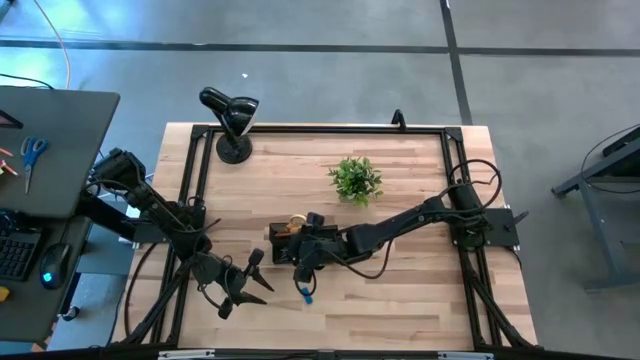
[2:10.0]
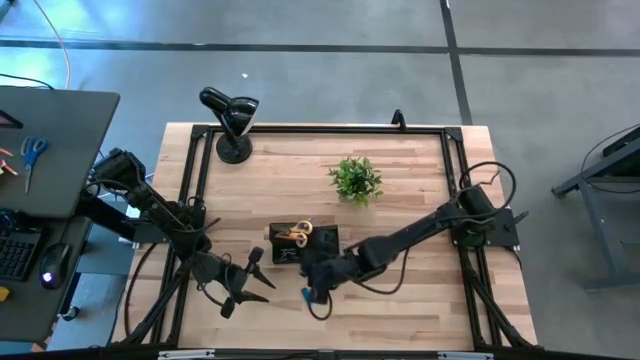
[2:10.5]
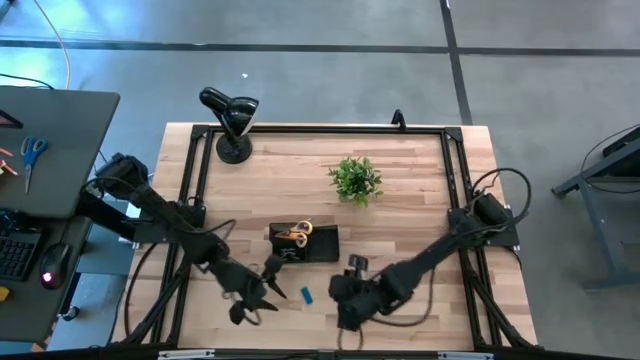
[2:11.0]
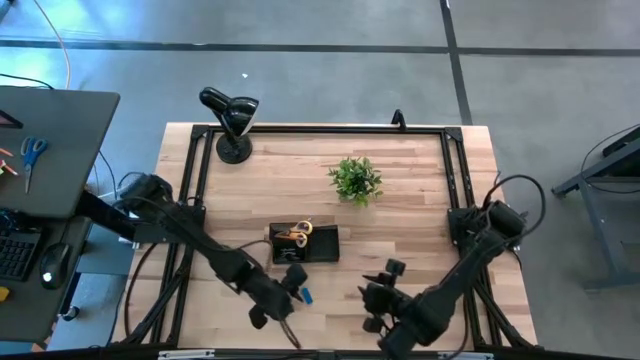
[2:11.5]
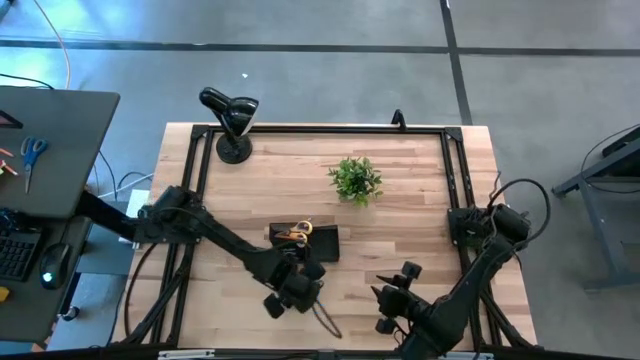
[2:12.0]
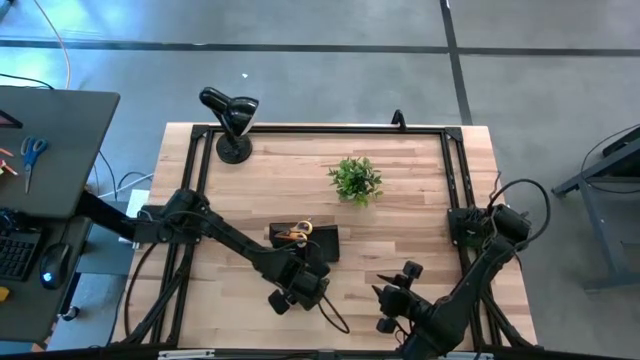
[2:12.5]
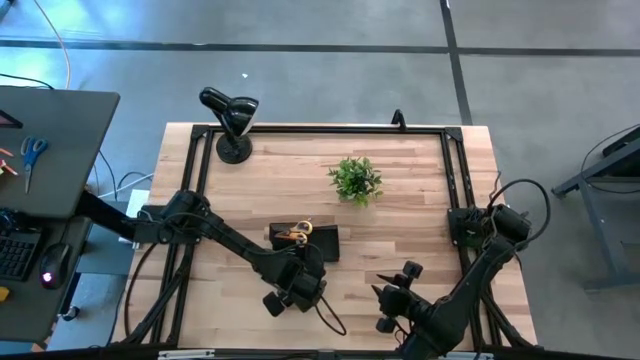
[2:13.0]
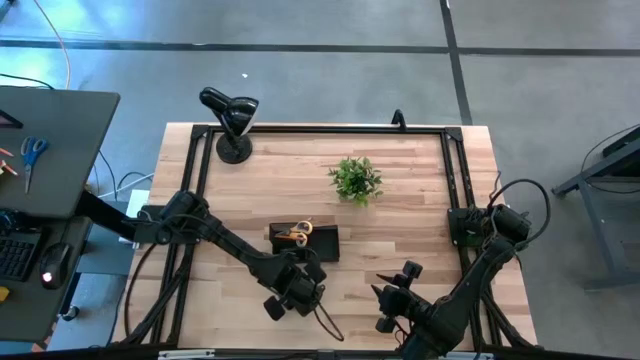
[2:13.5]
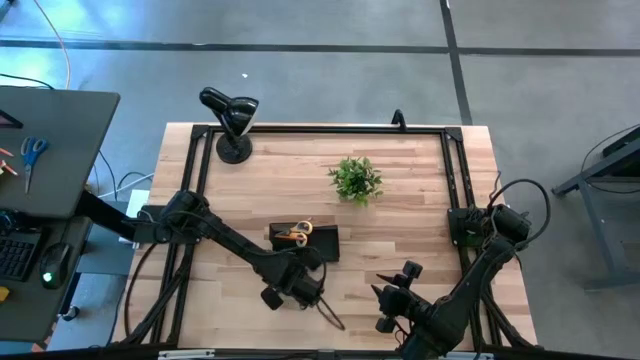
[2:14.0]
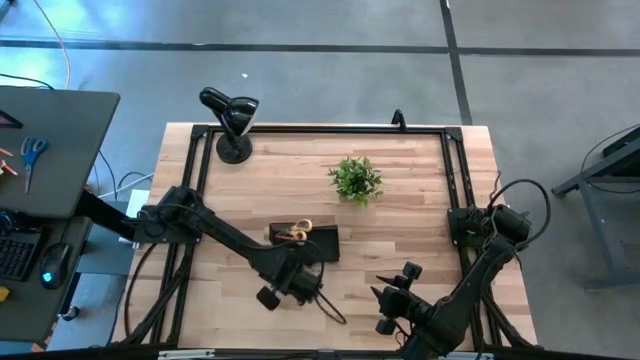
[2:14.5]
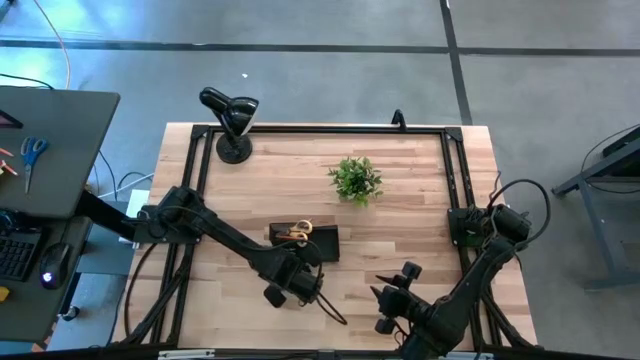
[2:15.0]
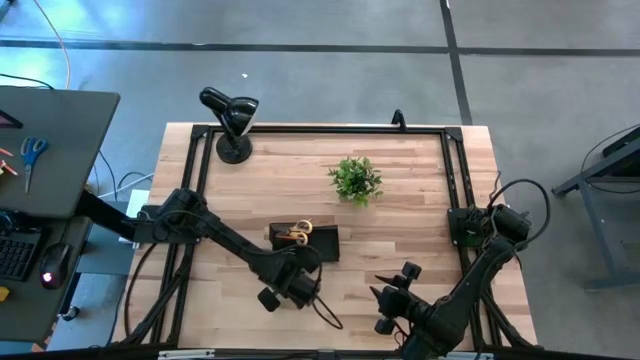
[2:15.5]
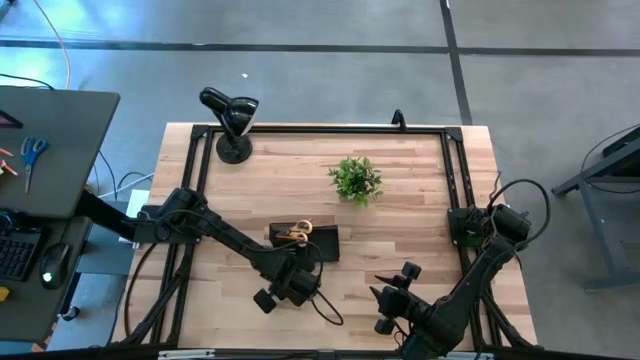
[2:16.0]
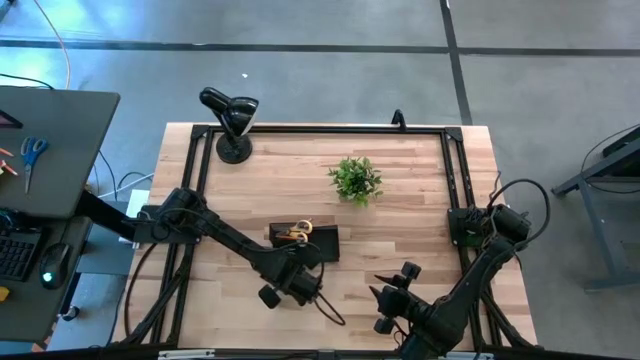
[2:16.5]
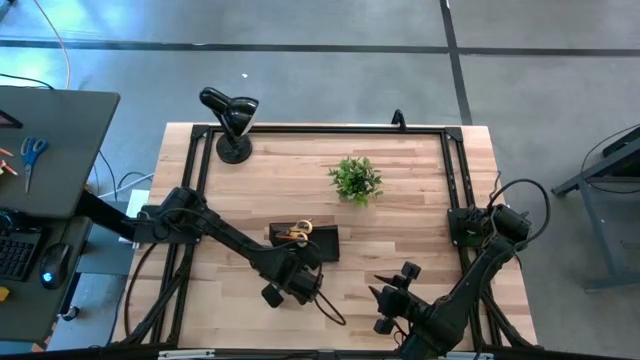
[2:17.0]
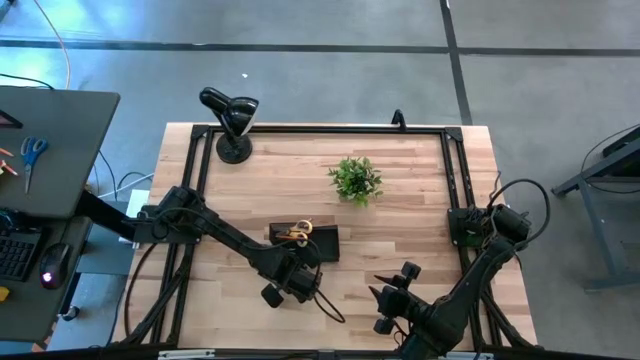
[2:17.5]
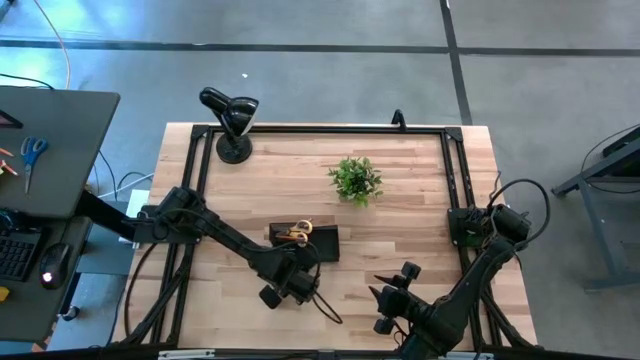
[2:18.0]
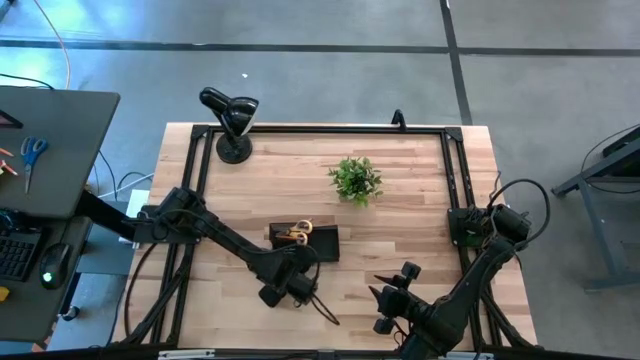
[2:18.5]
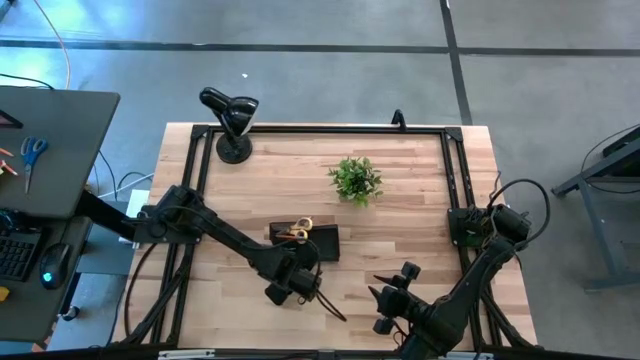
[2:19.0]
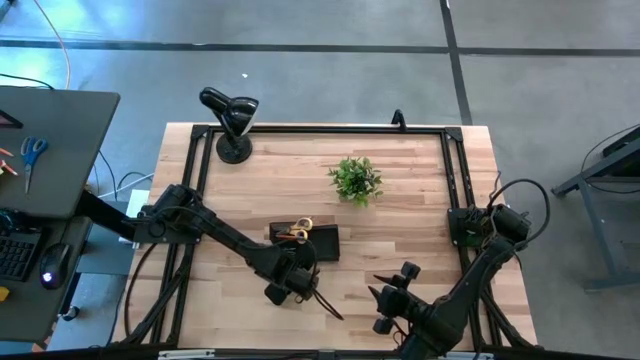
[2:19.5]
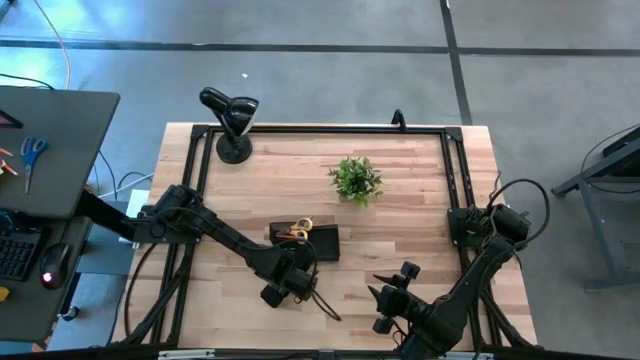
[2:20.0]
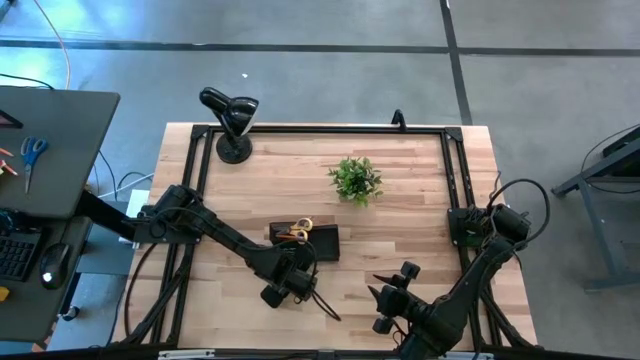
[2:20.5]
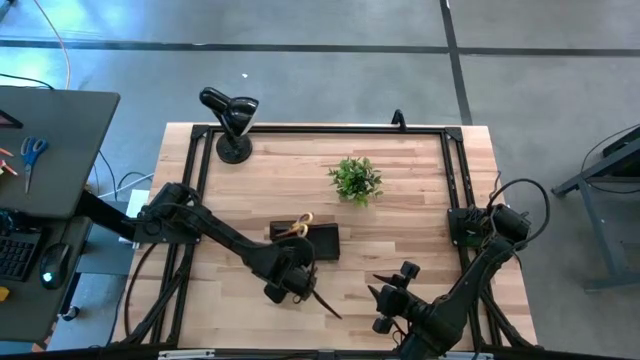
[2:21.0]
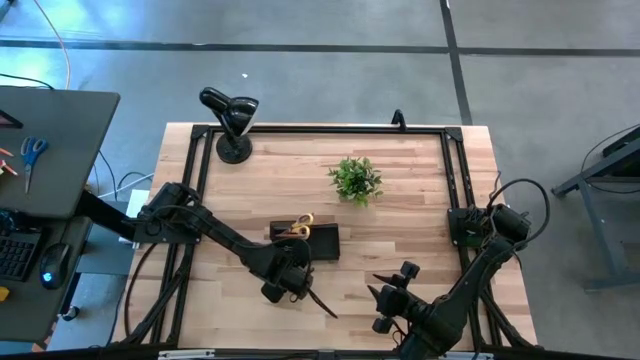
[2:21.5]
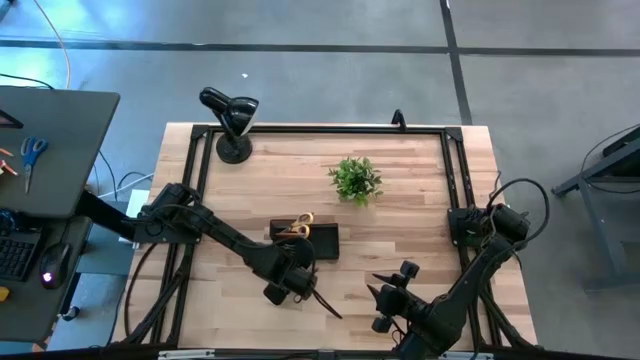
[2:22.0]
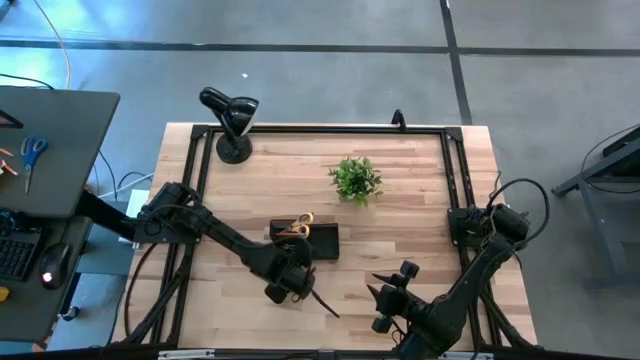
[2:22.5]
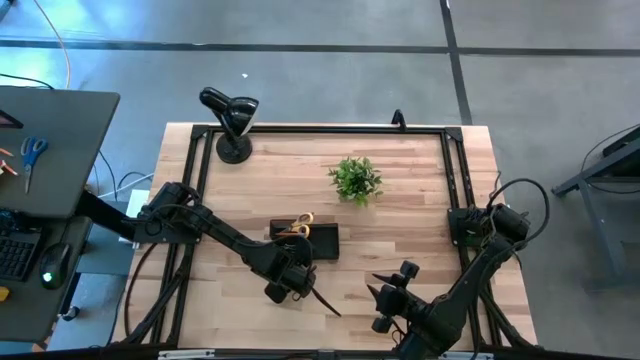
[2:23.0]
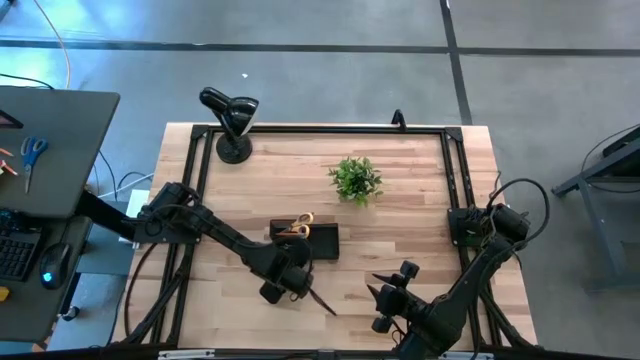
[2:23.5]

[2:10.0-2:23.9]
Task: Pick and place office supplies into organizer
Put the blue eraser into the black desk organizer

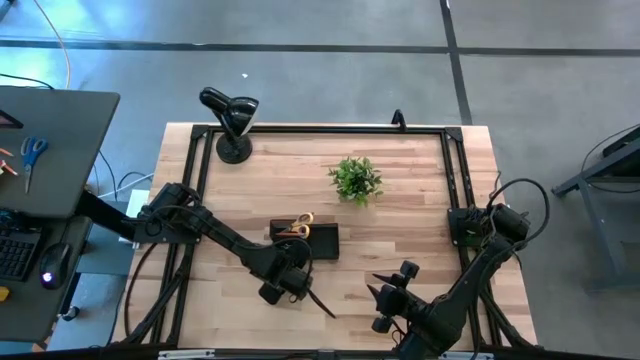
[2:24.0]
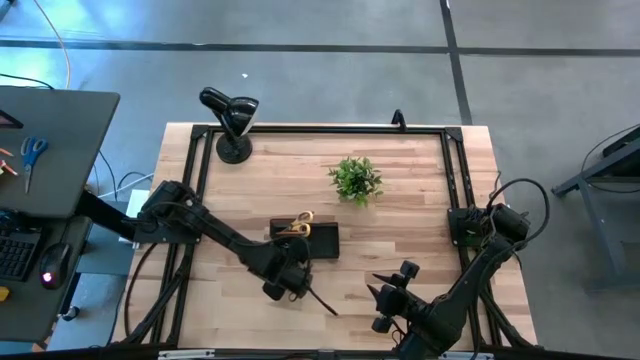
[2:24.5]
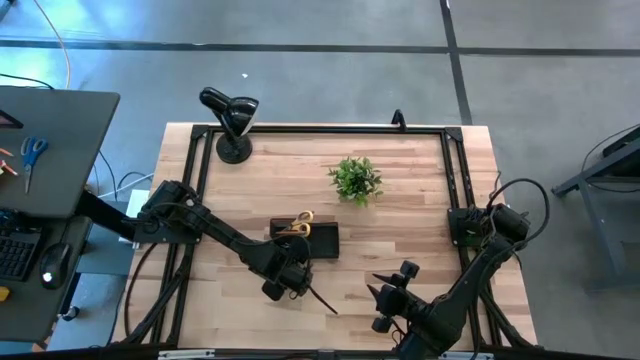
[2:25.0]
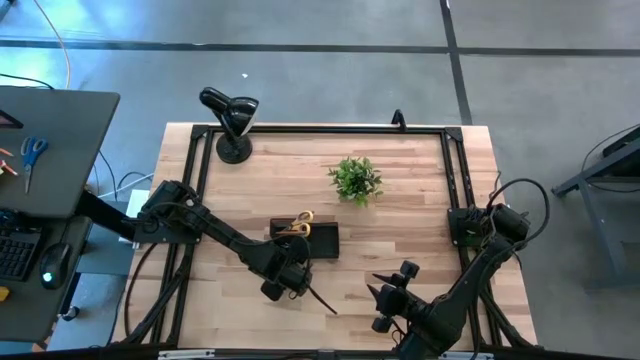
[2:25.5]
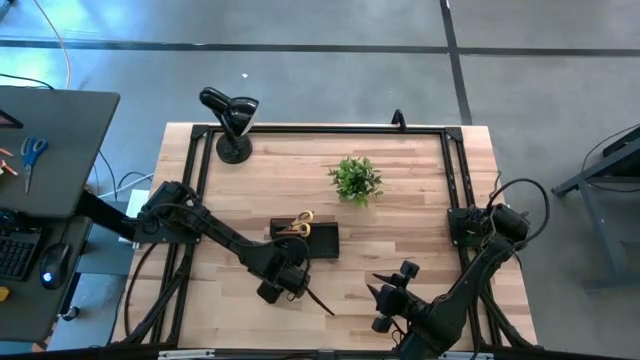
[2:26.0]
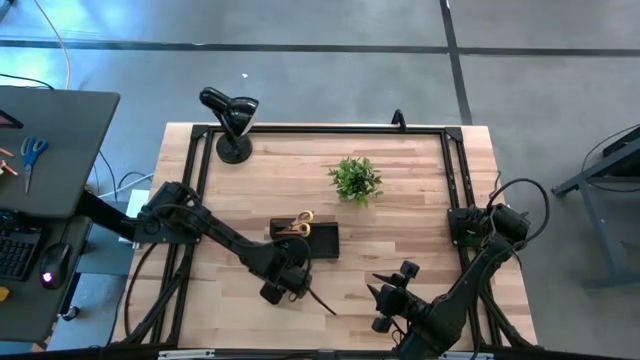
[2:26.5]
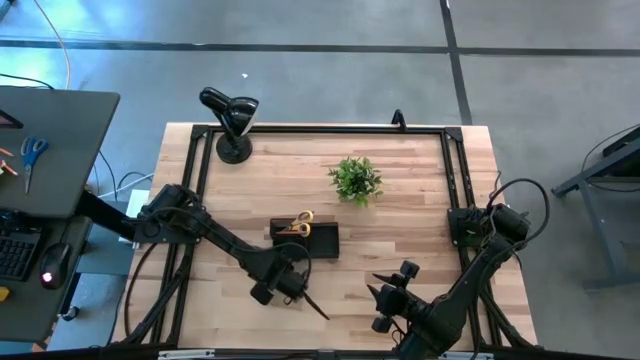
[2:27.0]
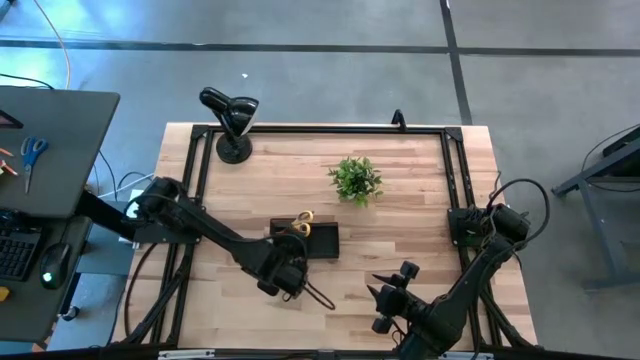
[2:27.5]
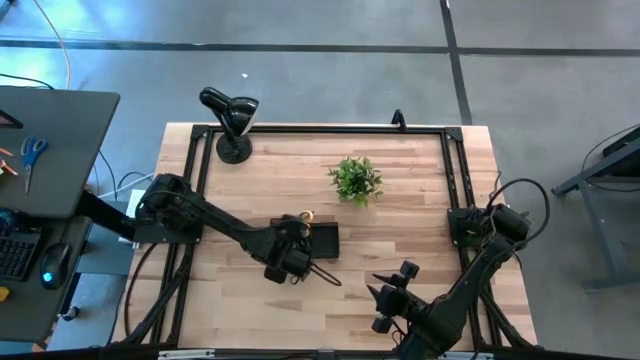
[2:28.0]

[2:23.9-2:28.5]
Put the blue eraser into the black desk organizer

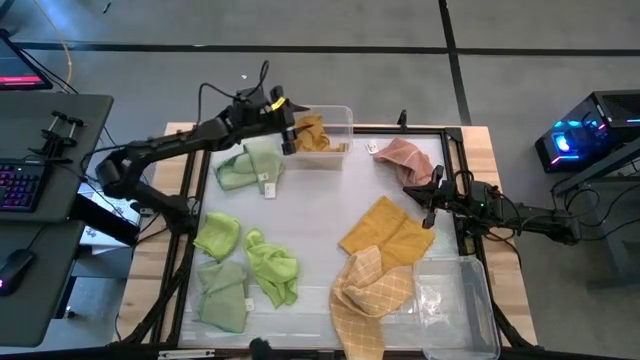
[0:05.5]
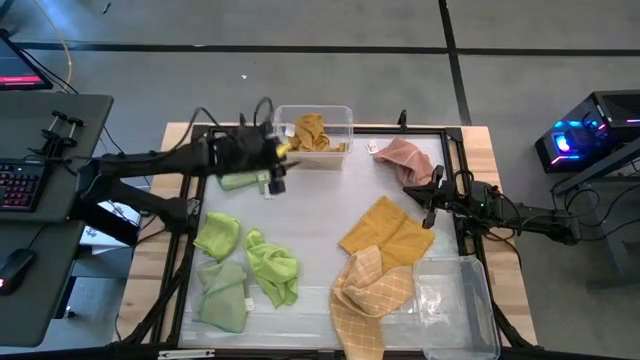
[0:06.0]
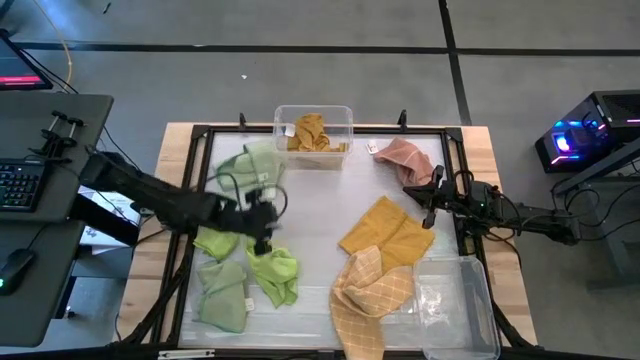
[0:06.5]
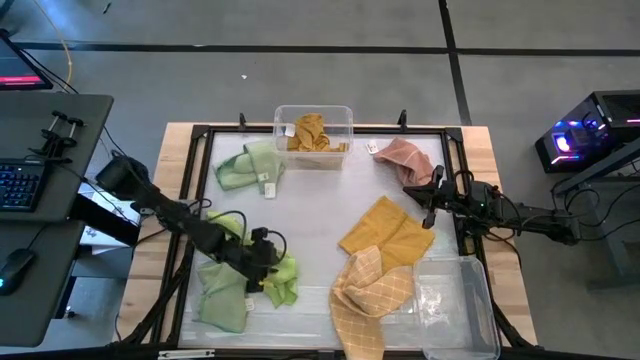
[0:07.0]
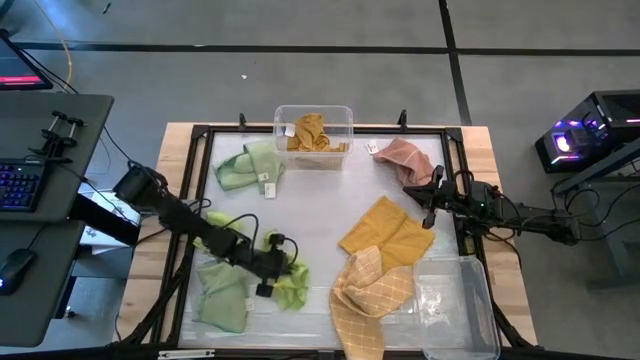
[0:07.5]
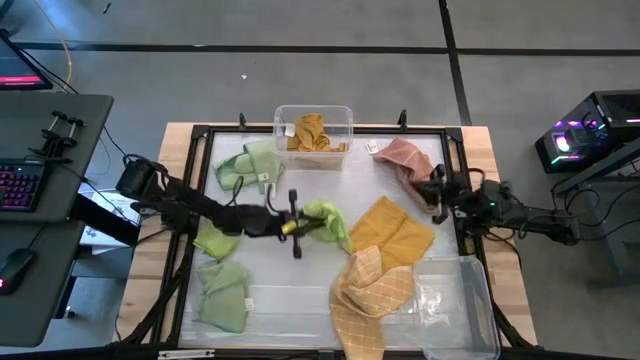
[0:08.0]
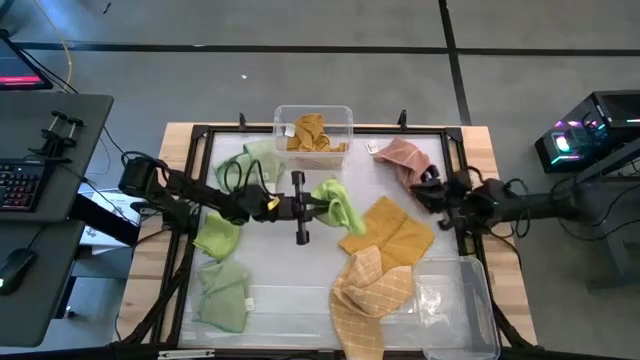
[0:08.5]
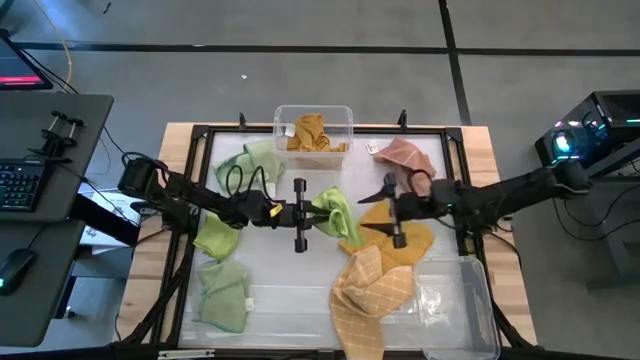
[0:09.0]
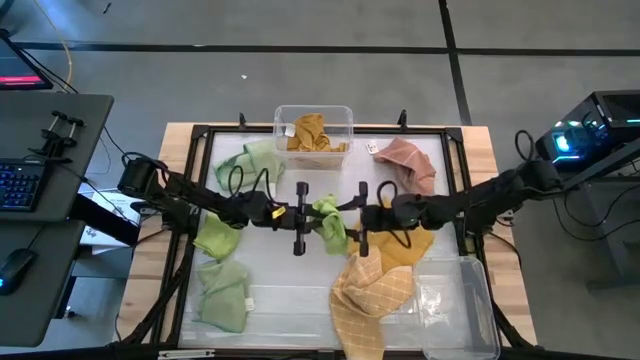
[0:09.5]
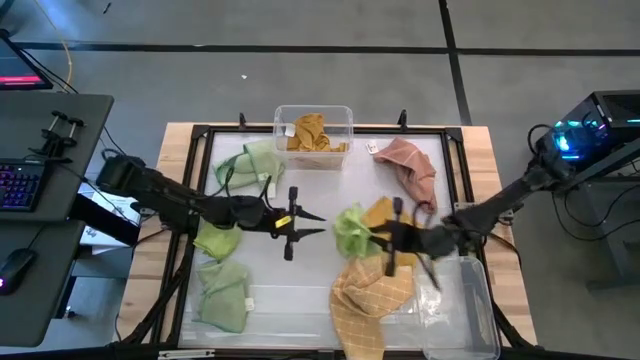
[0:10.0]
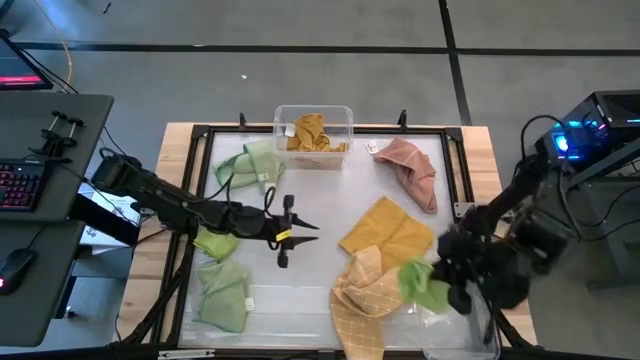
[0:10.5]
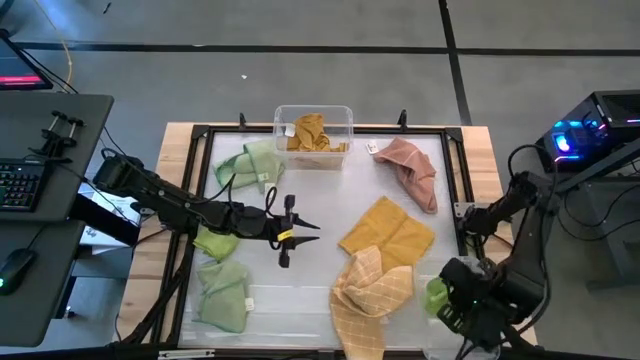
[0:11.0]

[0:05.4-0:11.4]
Task: Sort towels by color in basket
Put the right light green towel into the bottom transparent bin
